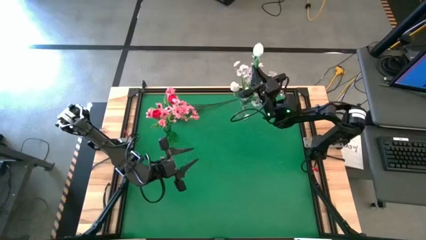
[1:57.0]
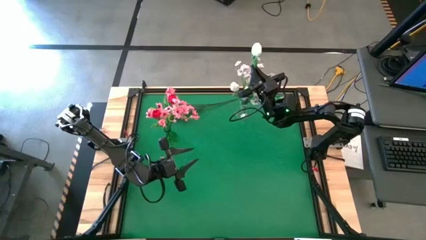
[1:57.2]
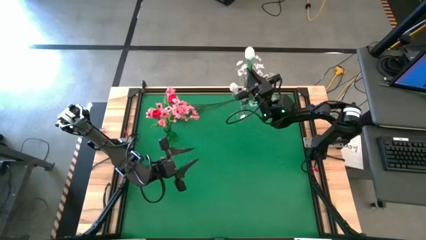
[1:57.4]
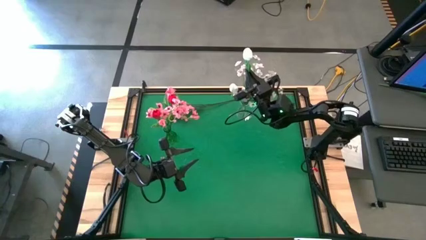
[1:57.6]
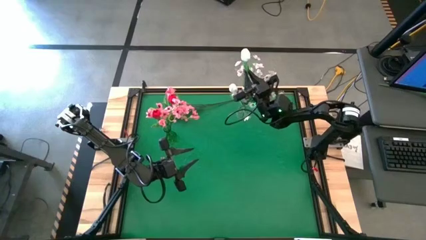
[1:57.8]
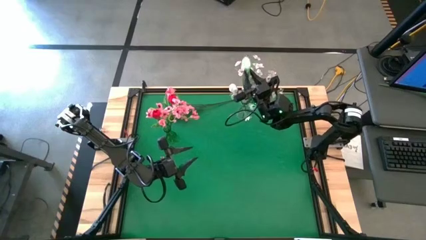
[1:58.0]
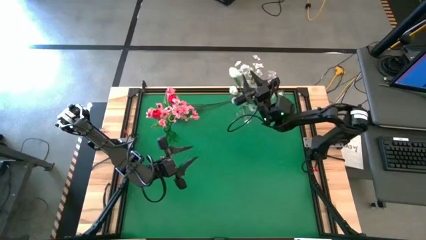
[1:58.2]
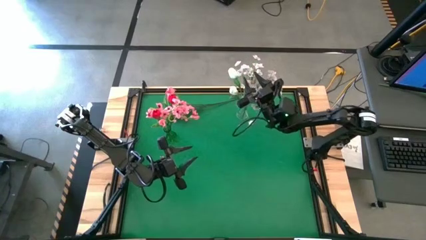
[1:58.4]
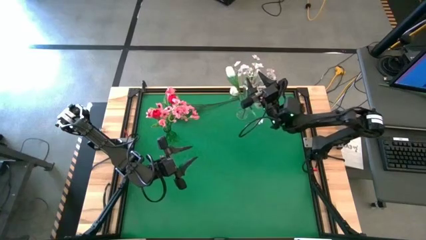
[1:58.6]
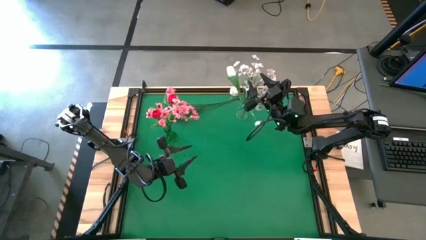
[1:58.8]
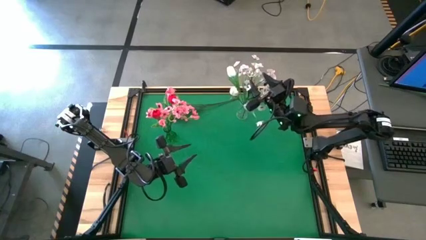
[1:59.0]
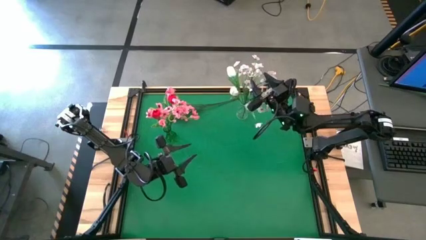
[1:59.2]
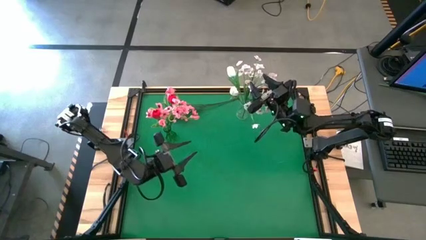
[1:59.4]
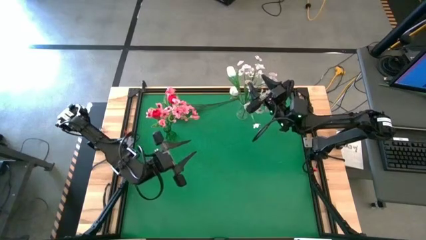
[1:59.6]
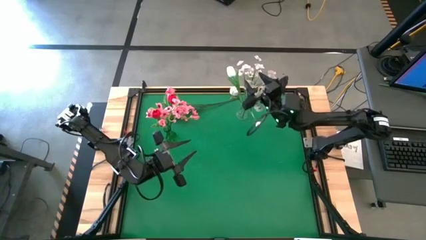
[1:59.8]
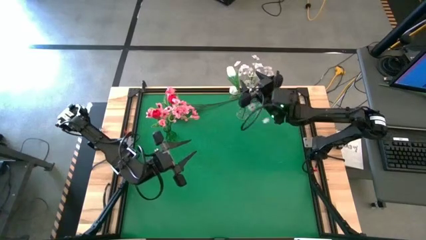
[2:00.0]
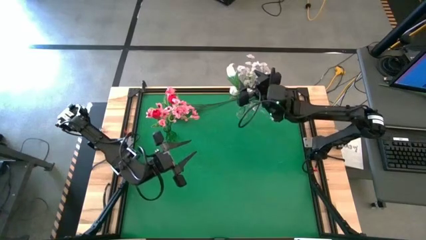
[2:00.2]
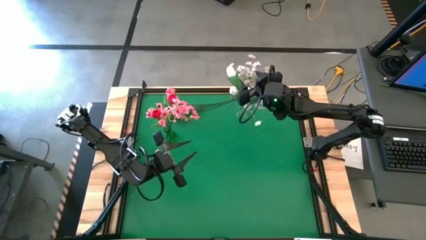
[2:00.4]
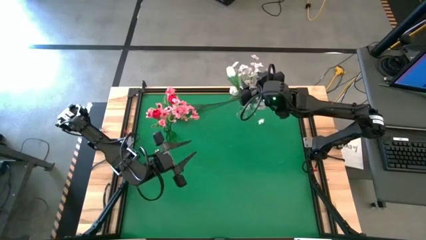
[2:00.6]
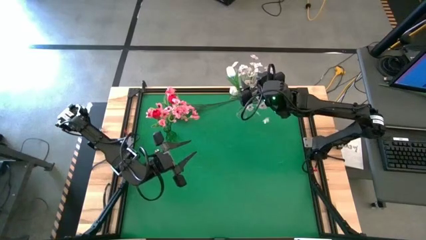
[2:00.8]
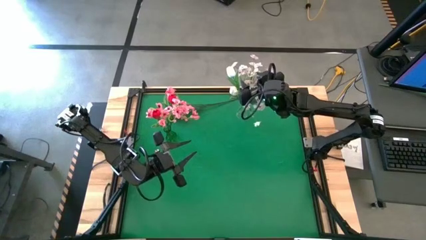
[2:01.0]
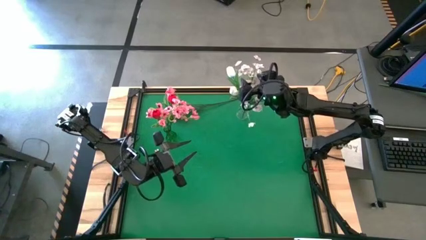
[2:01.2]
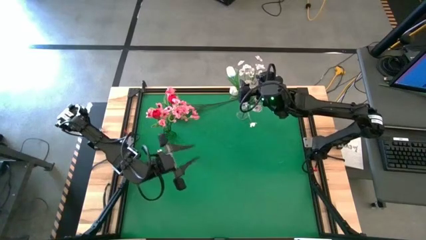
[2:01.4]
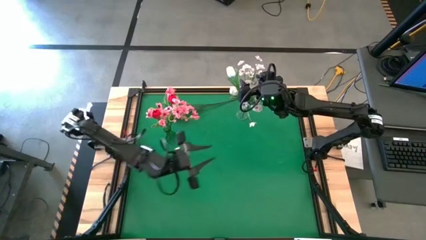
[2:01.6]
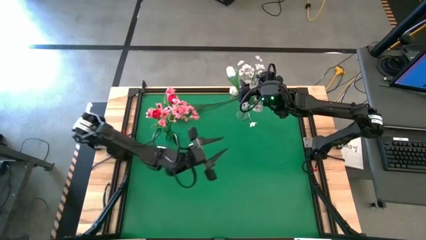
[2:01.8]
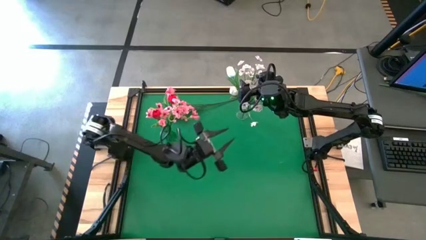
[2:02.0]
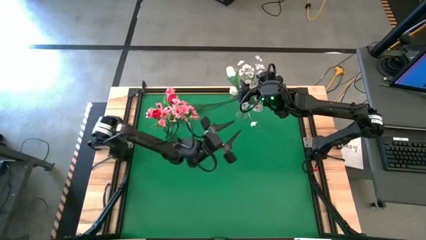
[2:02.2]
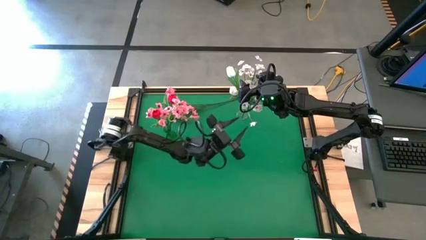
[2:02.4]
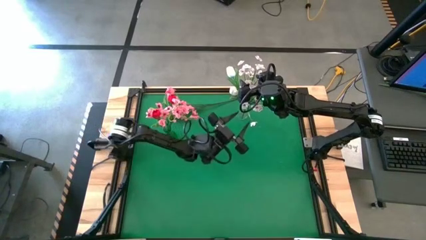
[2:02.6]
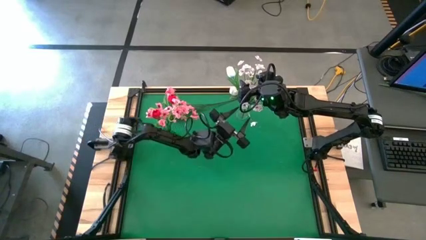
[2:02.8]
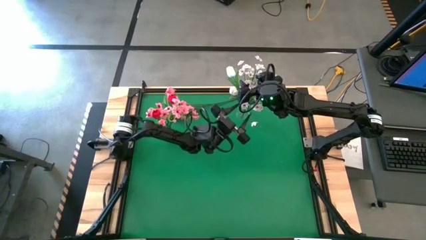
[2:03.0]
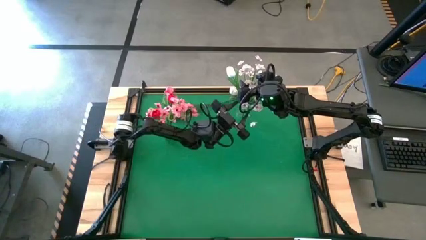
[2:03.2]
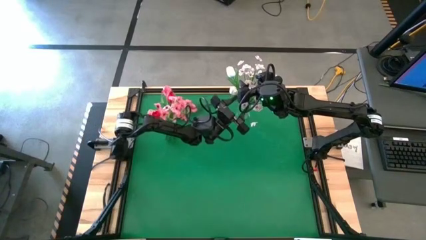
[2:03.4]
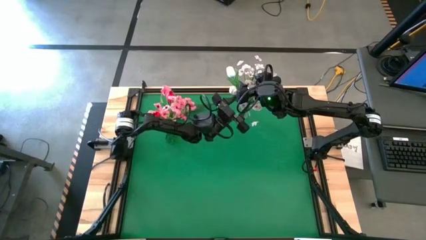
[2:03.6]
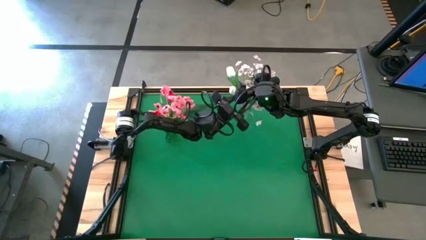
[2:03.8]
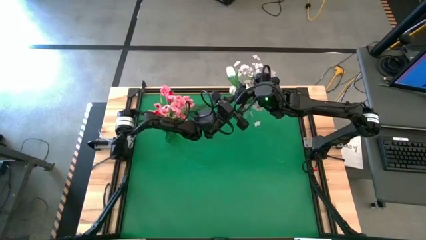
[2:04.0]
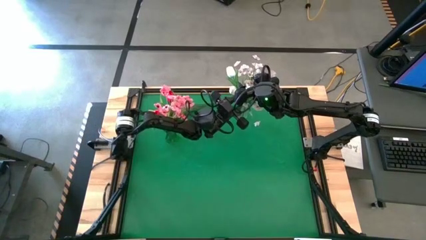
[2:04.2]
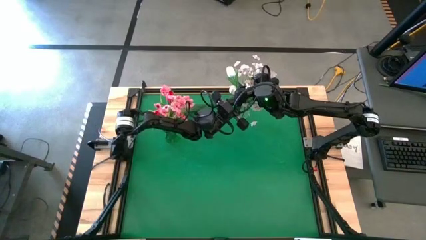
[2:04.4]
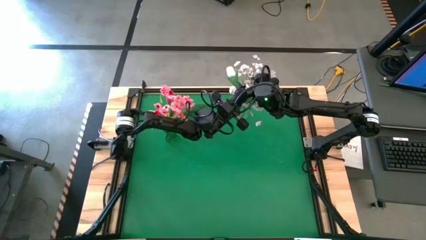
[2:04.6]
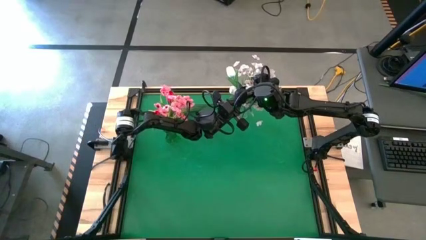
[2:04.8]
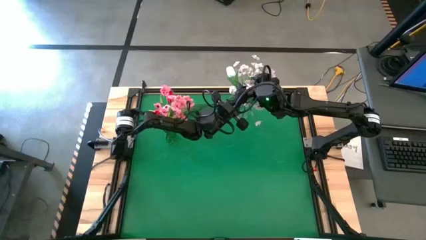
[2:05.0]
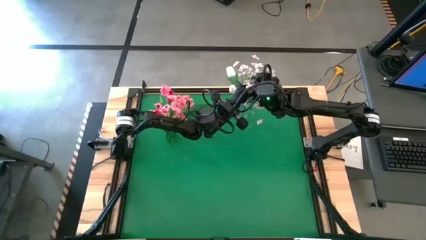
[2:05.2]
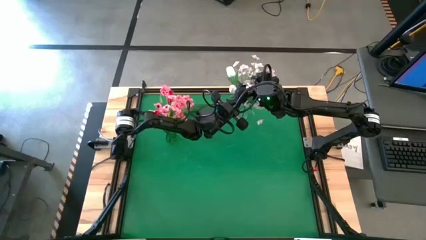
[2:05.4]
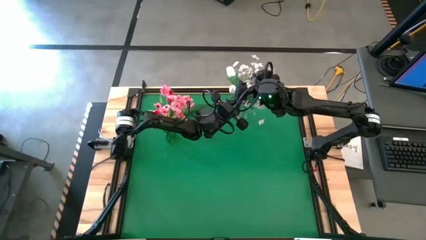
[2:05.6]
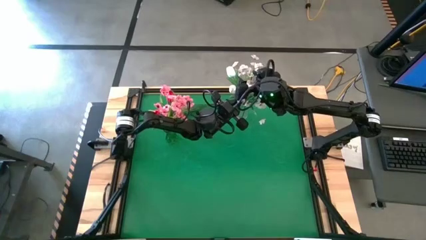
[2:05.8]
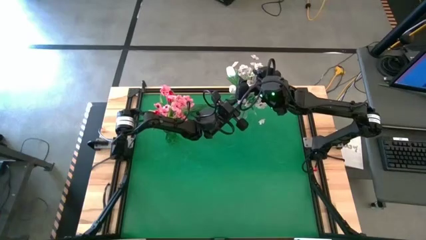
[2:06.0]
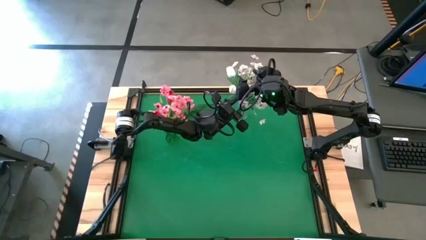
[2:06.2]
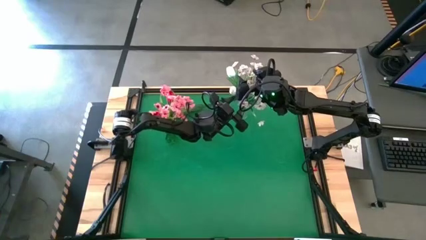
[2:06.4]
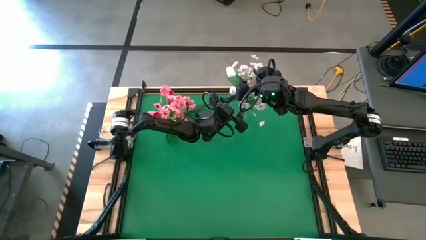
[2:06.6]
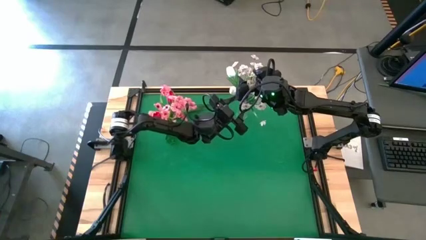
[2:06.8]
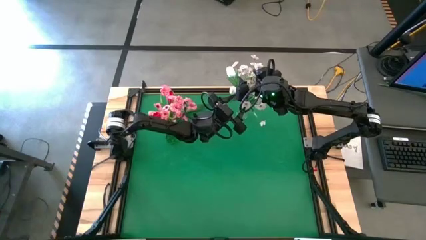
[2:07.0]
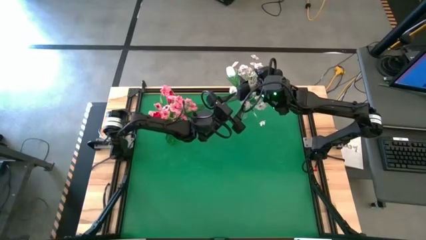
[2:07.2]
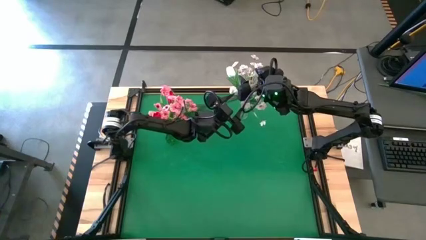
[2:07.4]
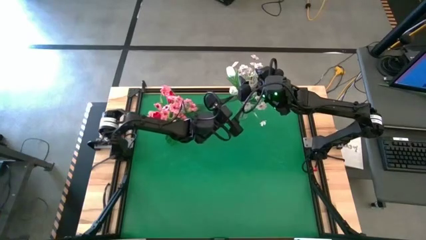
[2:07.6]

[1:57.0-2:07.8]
Task: Sort flowers into vase by color
Put the white flower into the transparent vase
